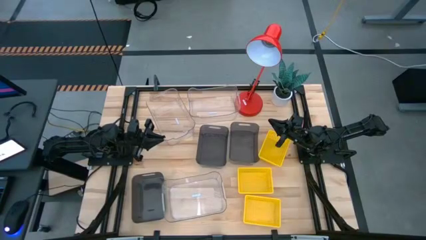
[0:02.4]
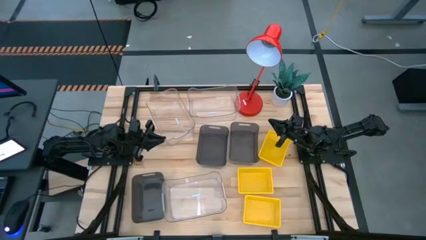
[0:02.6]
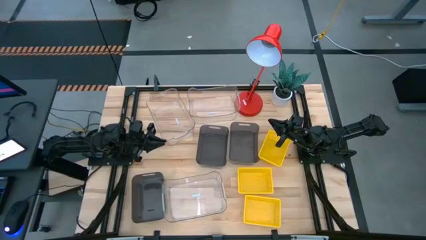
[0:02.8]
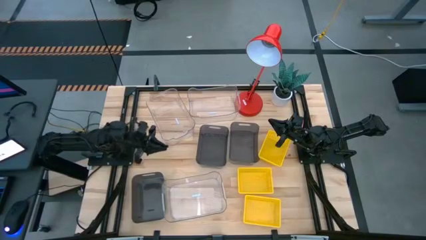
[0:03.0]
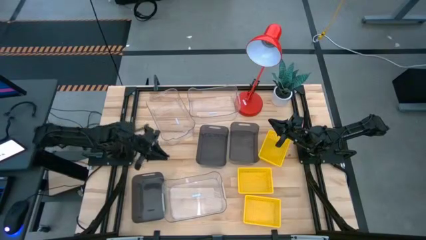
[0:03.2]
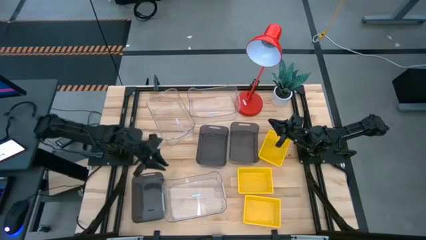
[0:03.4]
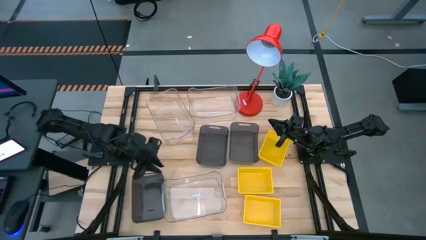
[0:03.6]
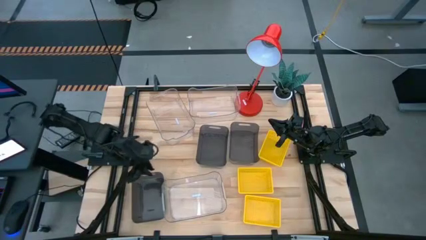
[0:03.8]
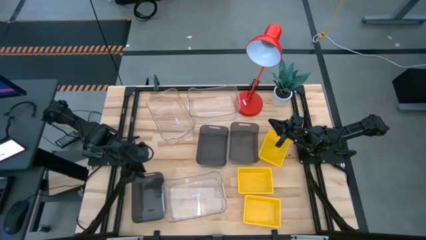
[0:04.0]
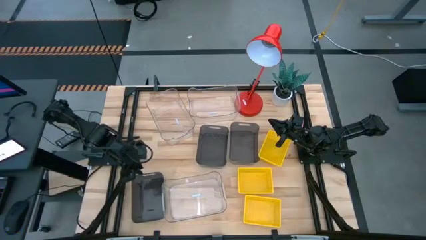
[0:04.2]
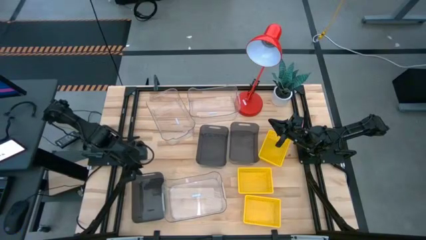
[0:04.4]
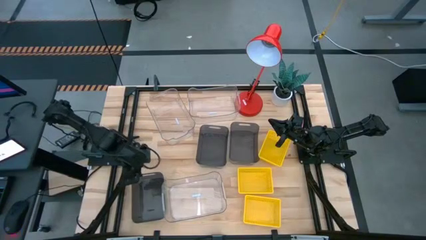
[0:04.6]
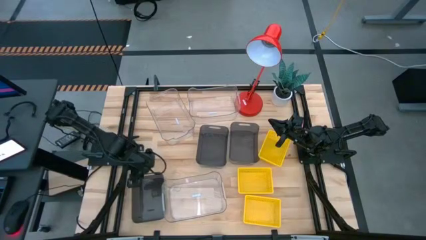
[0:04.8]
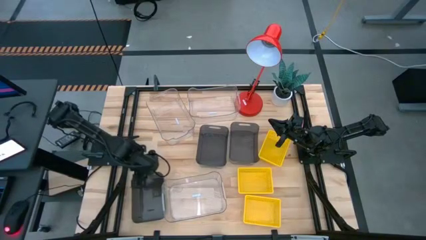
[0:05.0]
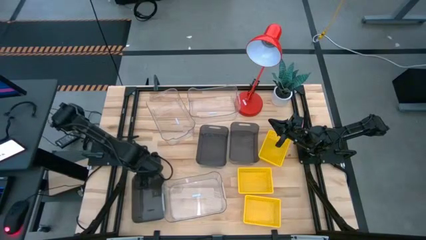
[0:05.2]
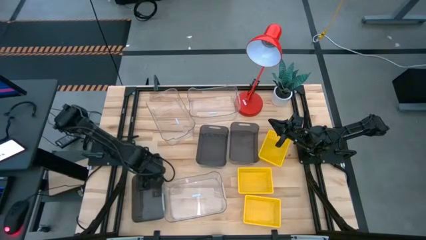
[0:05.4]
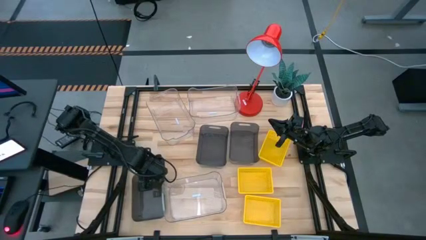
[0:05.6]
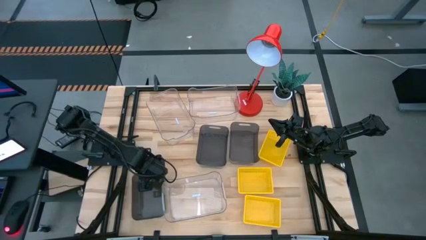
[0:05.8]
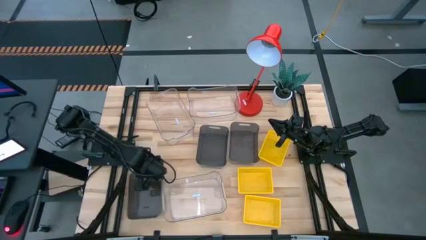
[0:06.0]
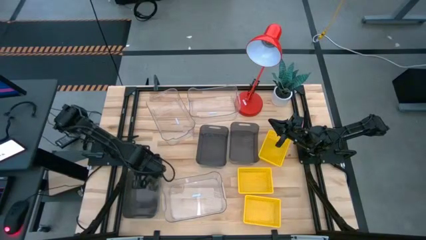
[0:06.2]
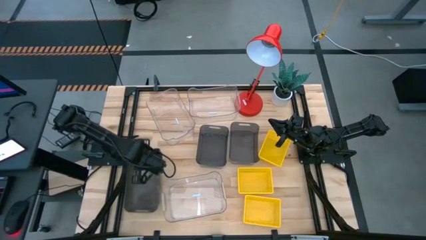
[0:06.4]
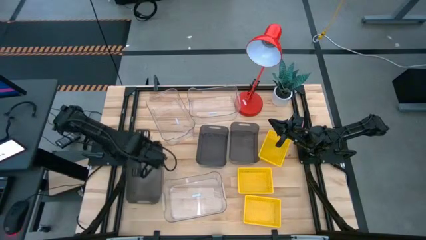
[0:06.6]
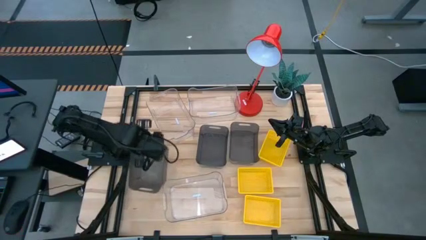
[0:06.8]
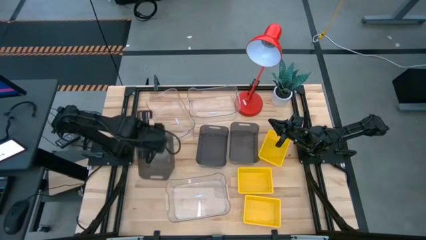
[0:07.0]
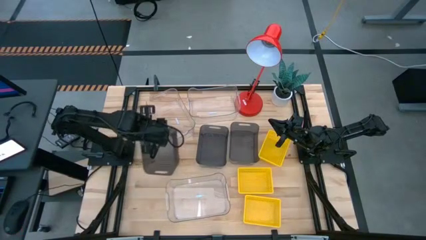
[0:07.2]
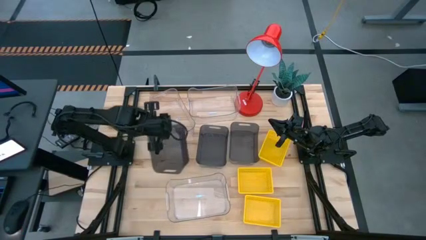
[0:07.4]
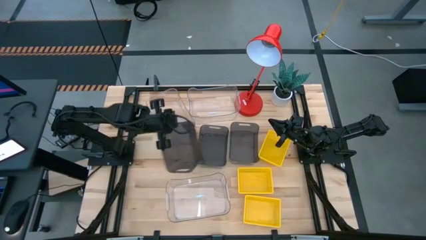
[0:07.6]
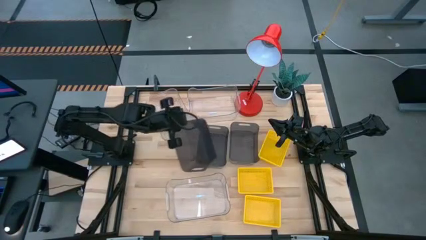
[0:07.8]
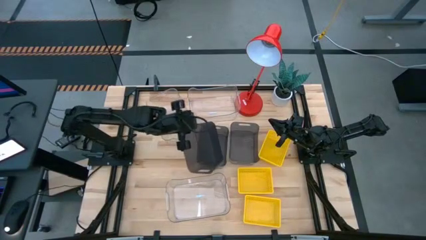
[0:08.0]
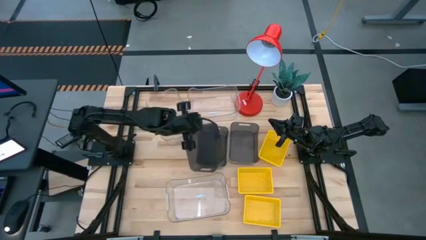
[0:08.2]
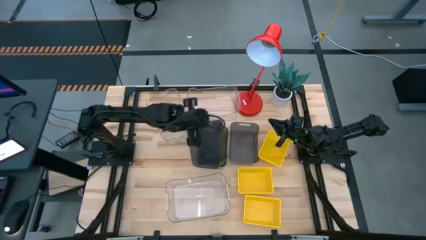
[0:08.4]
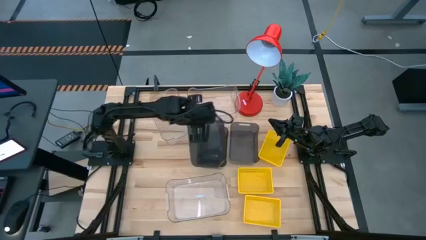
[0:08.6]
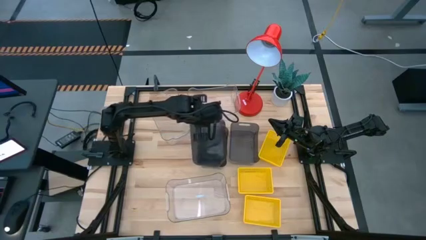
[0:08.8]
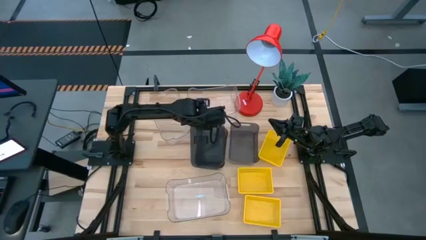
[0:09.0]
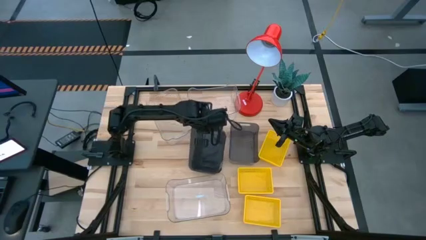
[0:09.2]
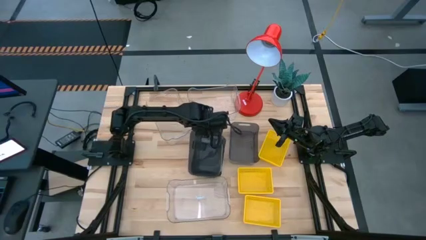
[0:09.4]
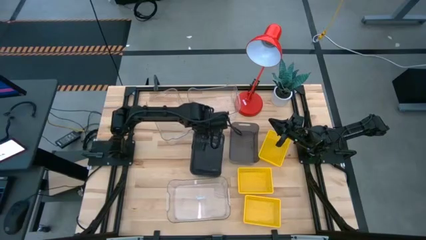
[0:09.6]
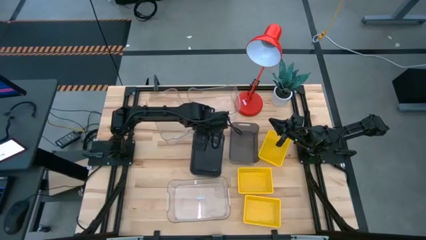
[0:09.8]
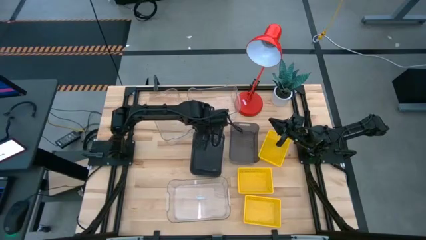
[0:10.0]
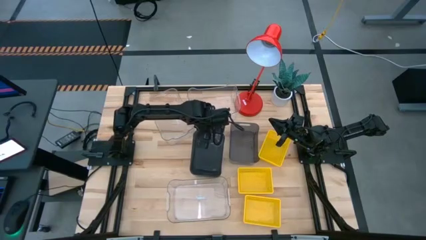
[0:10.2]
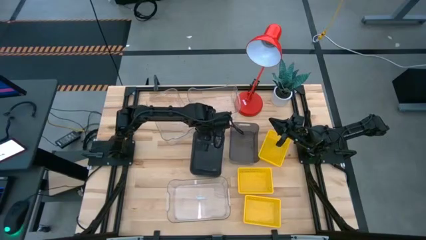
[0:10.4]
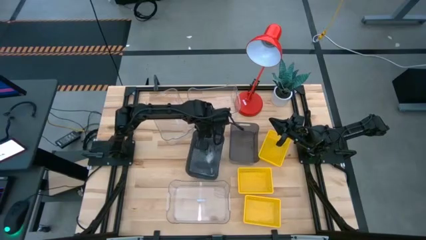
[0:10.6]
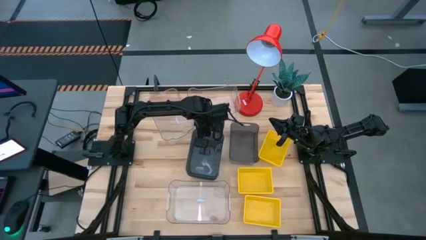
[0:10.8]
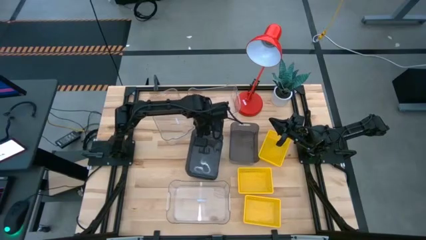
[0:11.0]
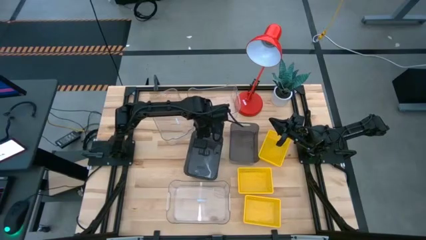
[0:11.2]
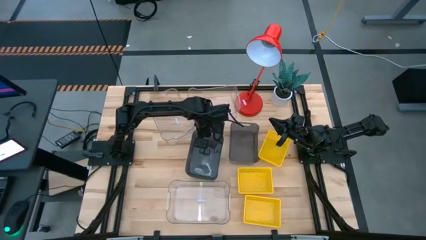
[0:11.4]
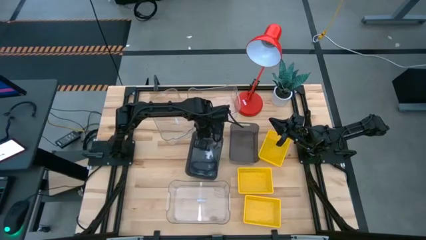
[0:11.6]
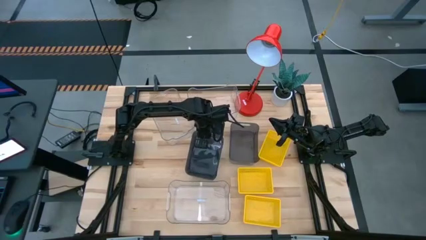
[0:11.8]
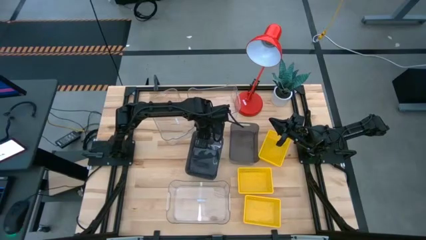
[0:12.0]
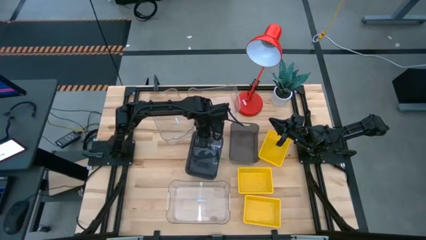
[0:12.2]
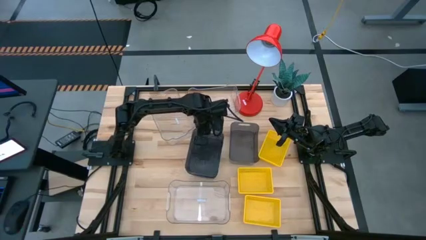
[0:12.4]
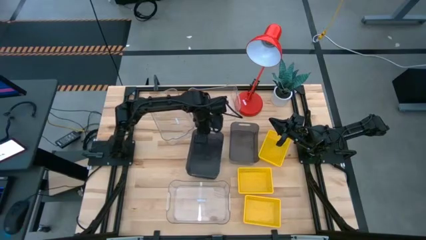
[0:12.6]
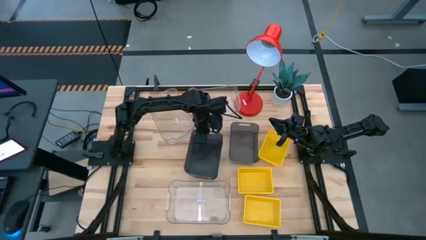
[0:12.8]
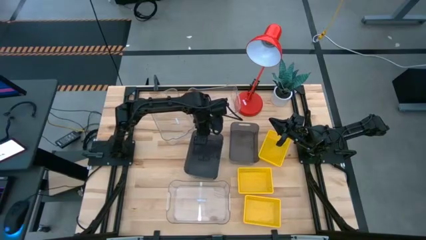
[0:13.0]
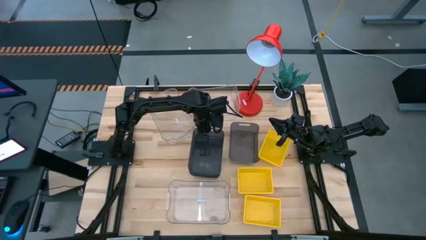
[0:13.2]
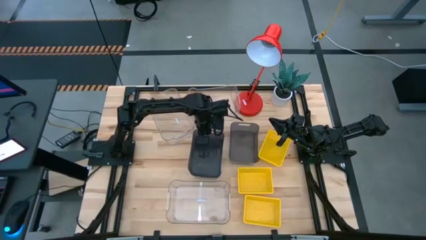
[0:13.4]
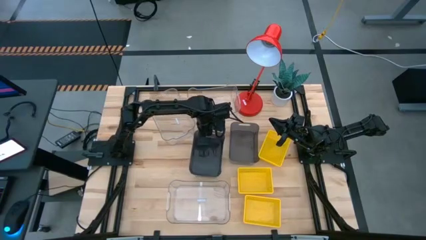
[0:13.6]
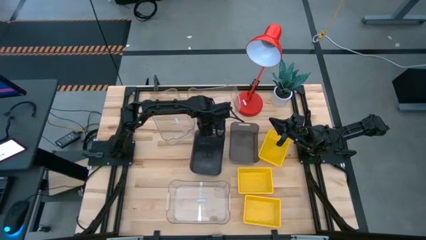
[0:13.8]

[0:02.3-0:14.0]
Stack the bottom black bin on the center black bin

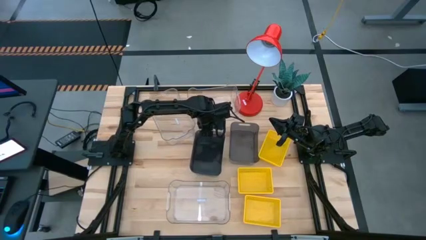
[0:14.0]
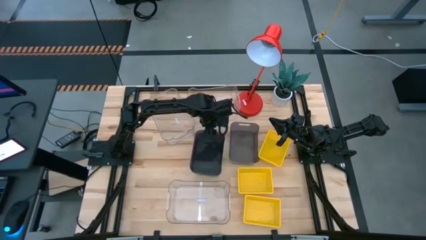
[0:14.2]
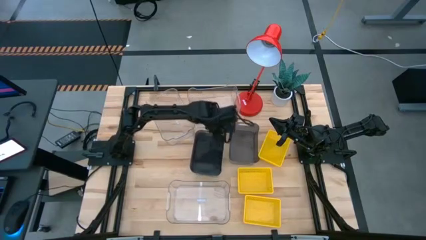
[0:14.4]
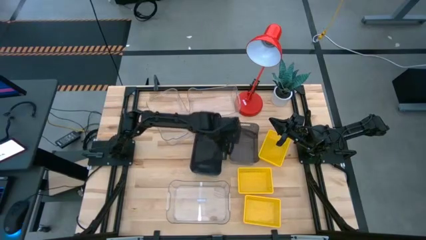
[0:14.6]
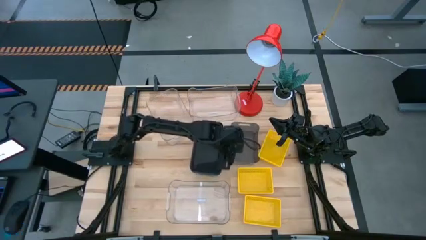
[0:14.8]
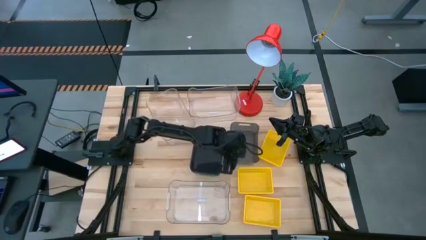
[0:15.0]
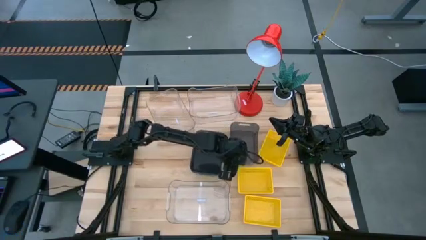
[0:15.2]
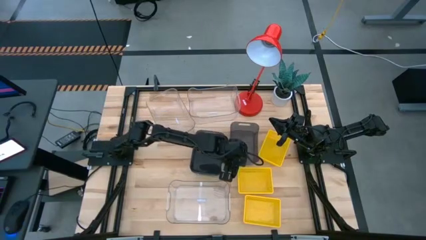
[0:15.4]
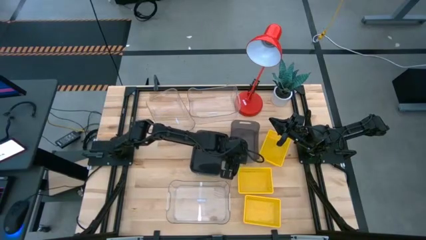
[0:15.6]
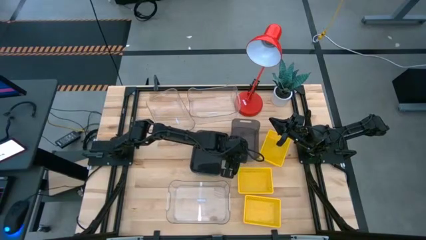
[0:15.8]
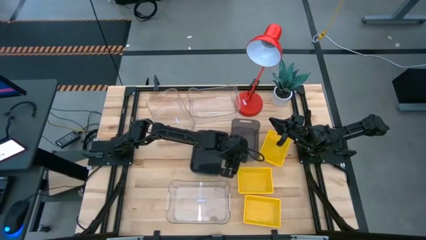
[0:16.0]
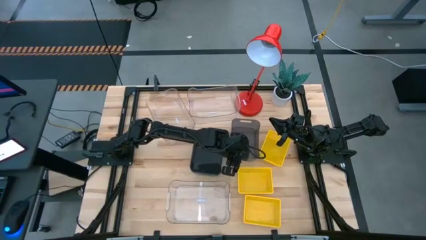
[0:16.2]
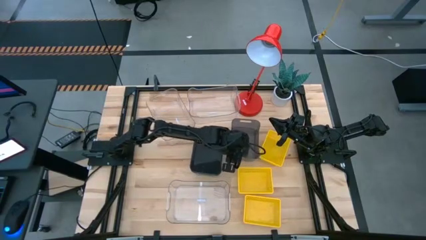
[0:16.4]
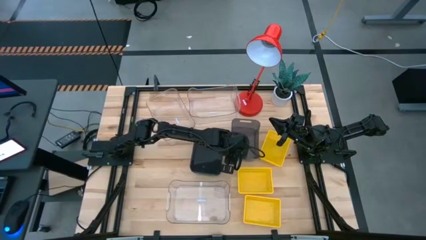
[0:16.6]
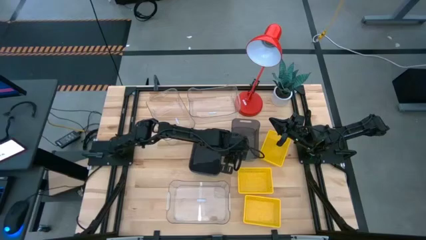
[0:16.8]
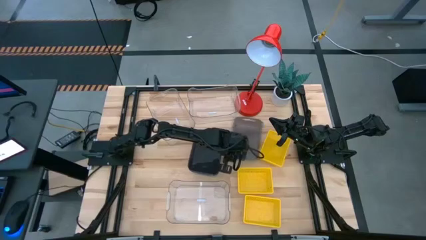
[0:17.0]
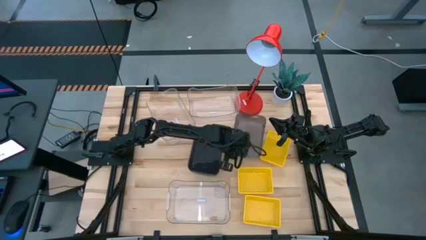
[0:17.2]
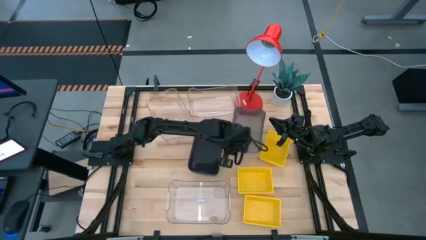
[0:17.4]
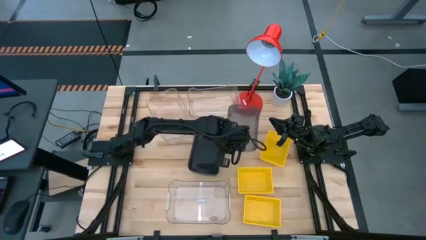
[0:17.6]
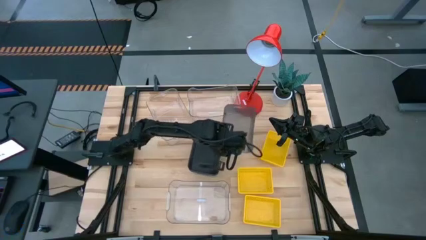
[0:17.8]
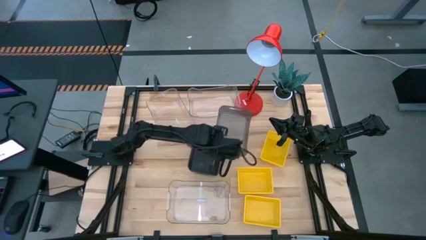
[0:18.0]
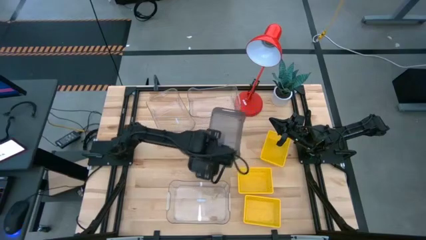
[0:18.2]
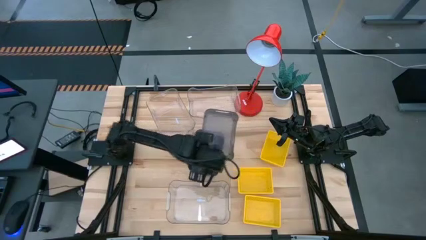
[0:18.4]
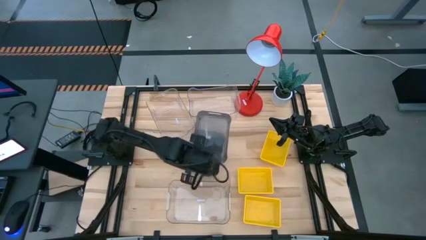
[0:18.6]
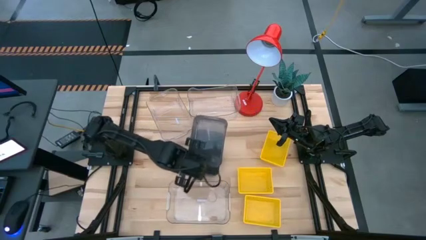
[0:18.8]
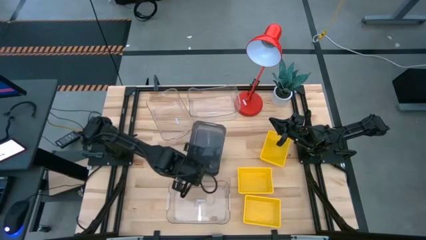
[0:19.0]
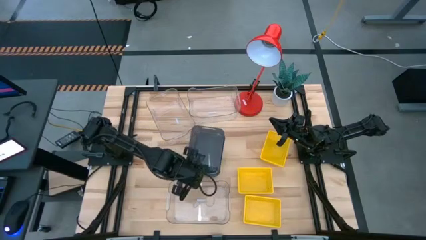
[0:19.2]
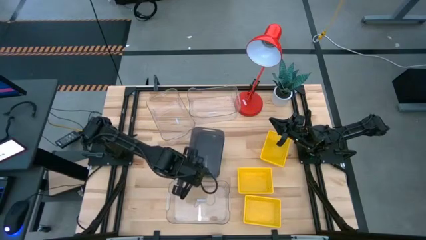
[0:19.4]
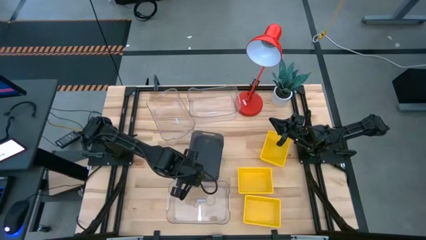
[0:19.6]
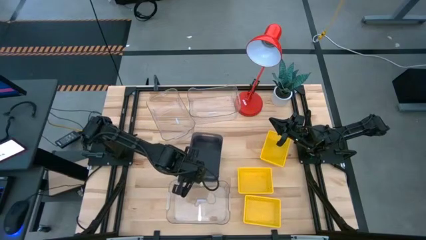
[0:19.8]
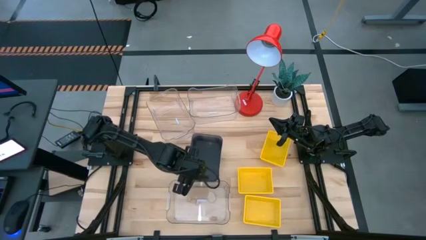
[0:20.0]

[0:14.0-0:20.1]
Stack the right black bin on the black bins
